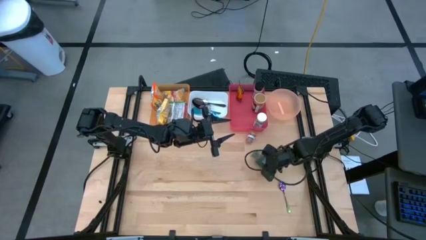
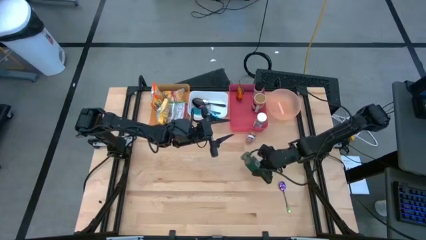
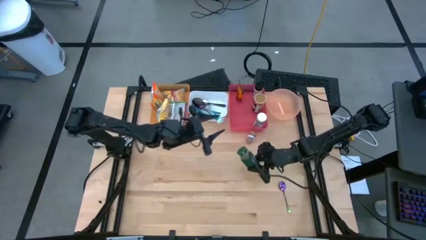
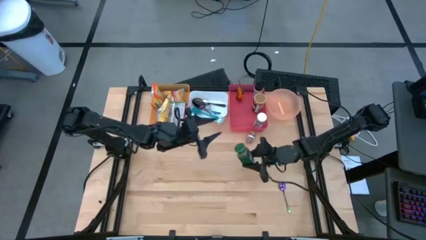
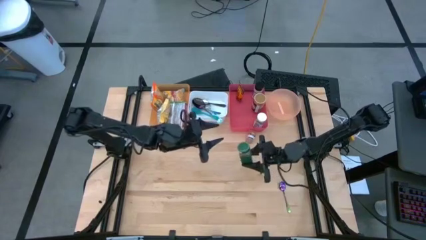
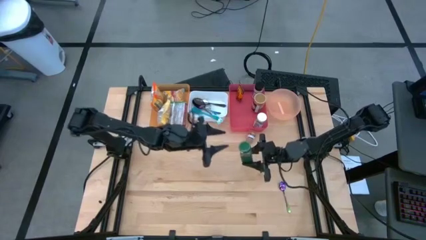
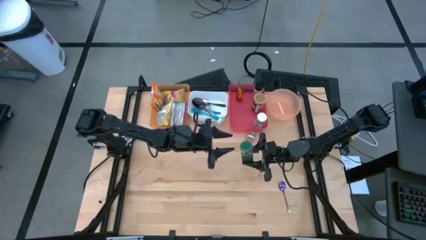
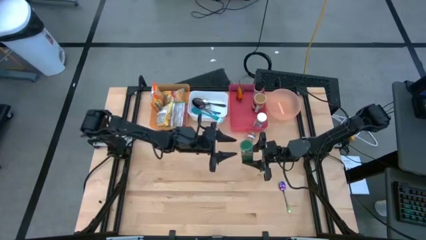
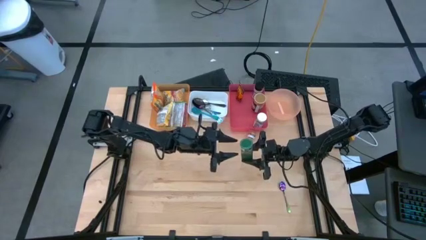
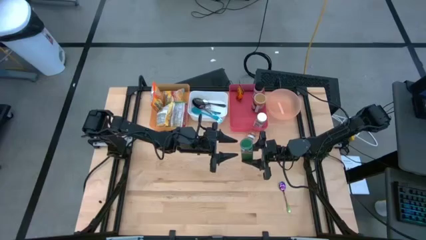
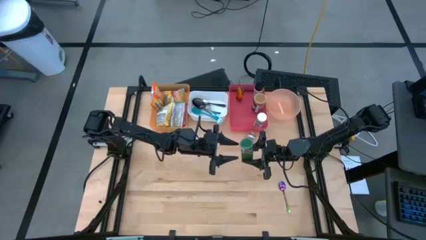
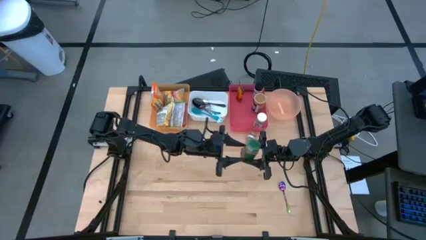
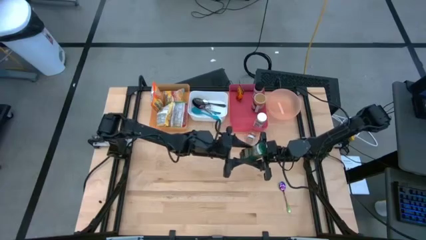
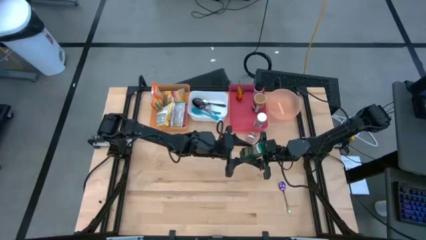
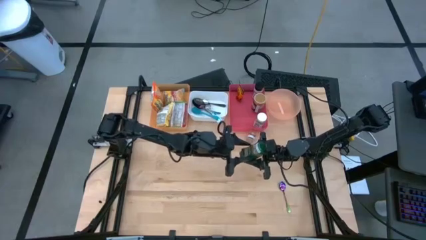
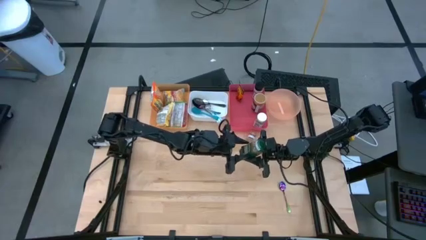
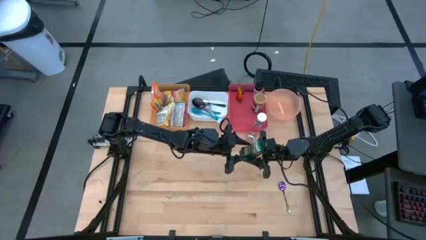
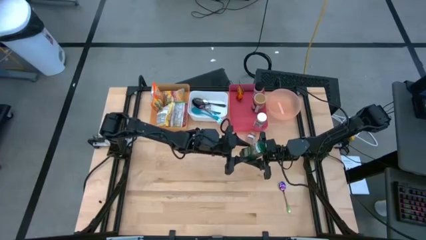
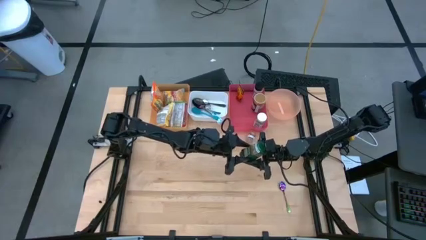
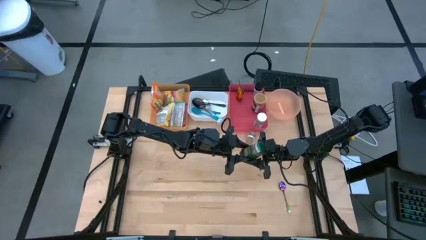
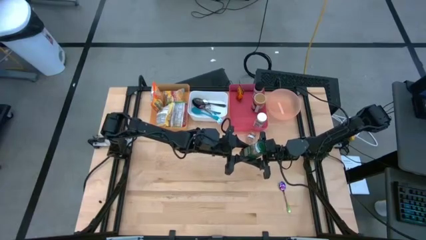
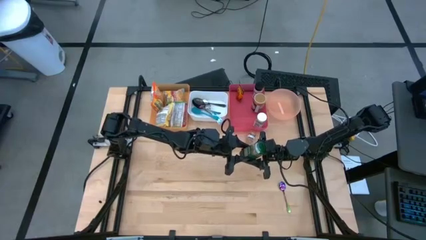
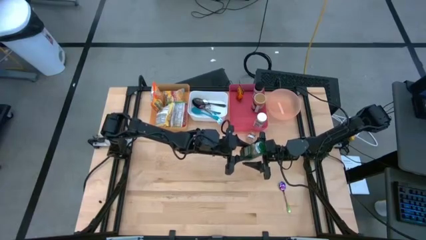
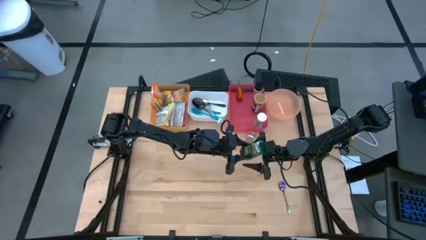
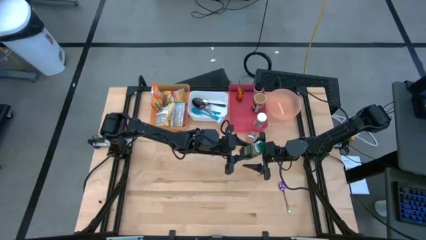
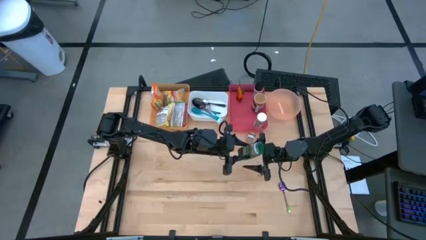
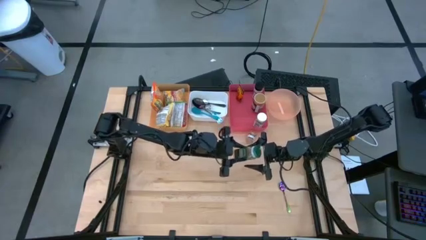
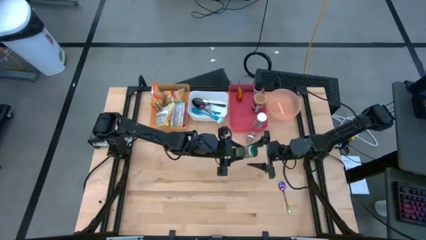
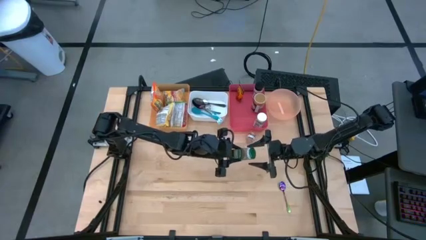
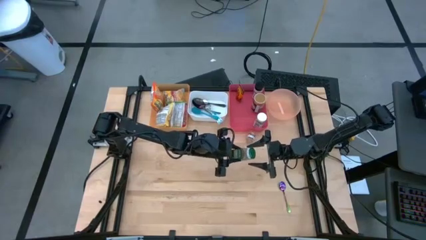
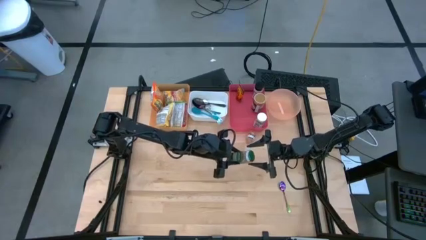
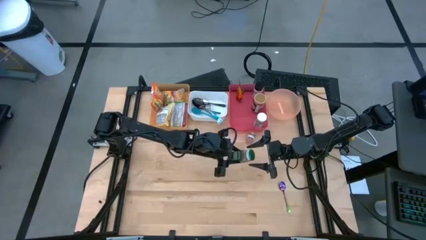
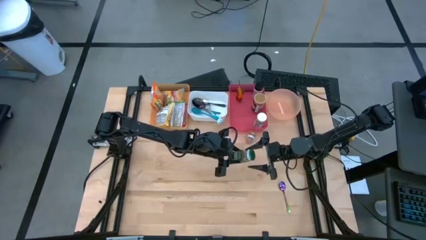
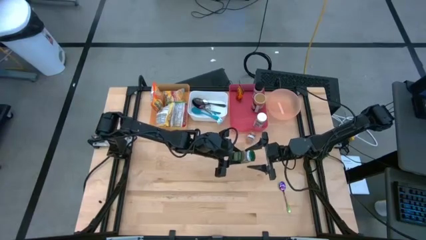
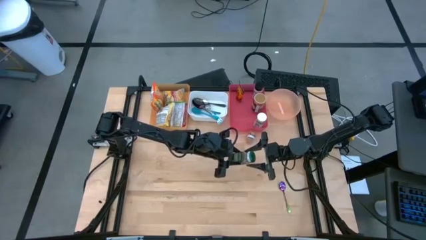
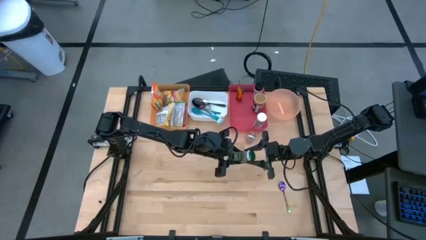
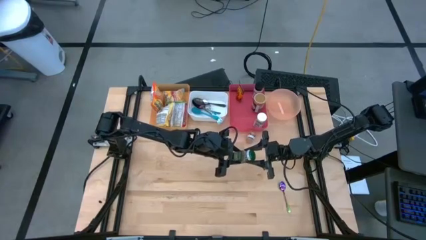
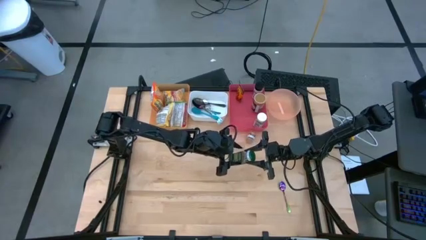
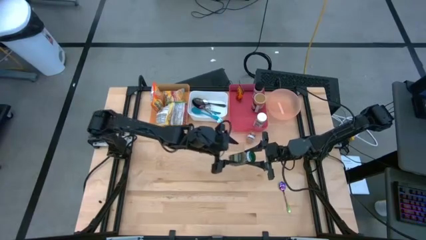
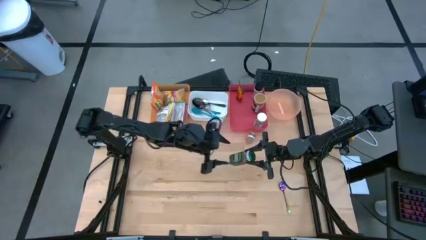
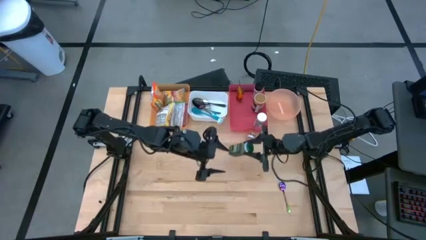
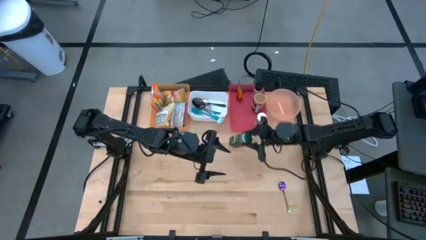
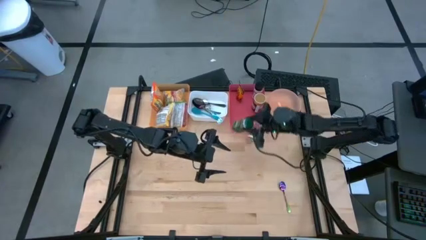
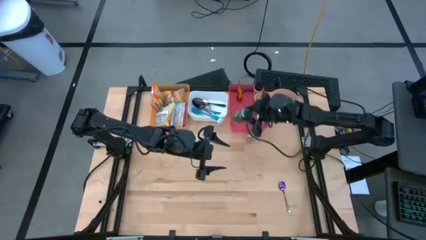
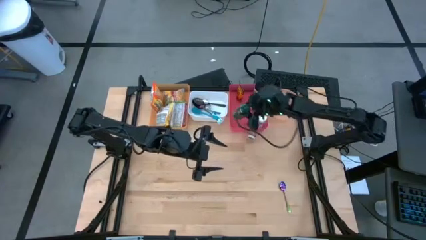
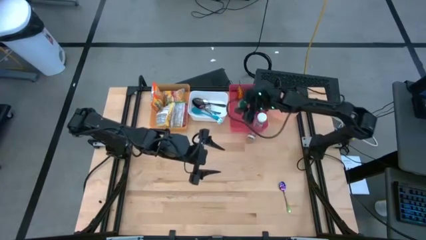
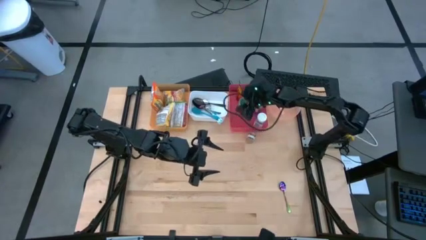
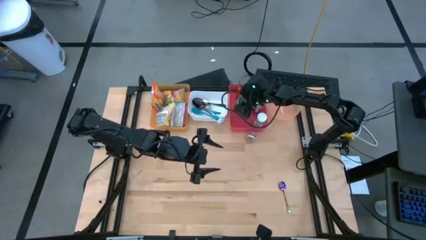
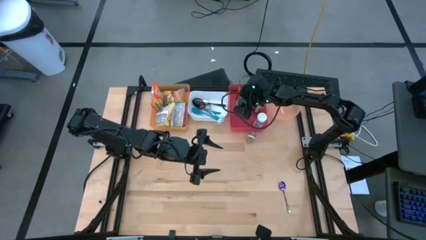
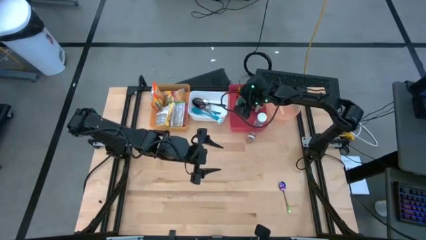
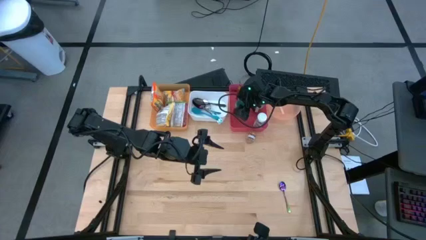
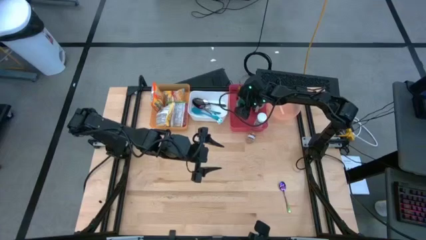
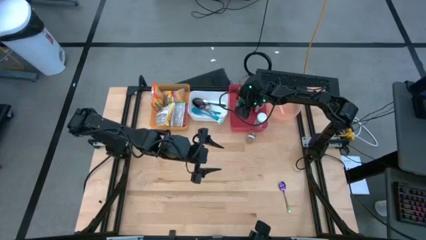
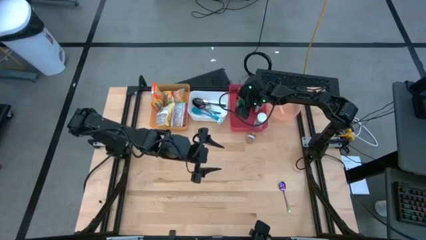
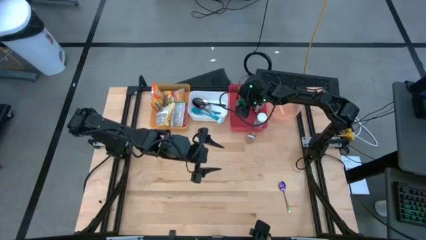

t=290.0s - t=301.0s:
Task: Pick & Place Food Item
Put the green seasoning bottle into the red bin
